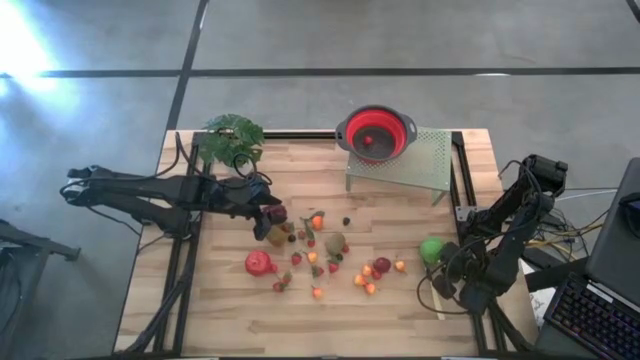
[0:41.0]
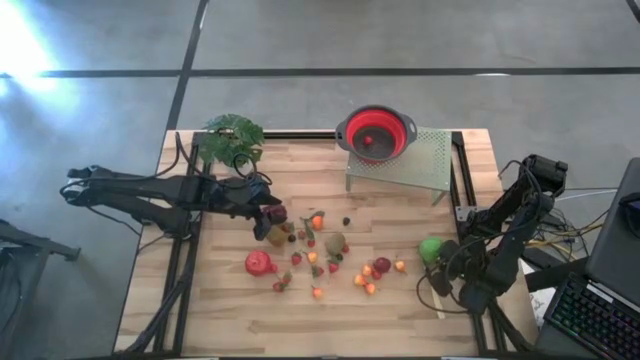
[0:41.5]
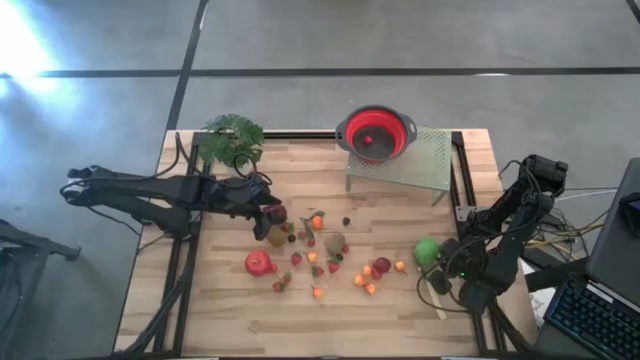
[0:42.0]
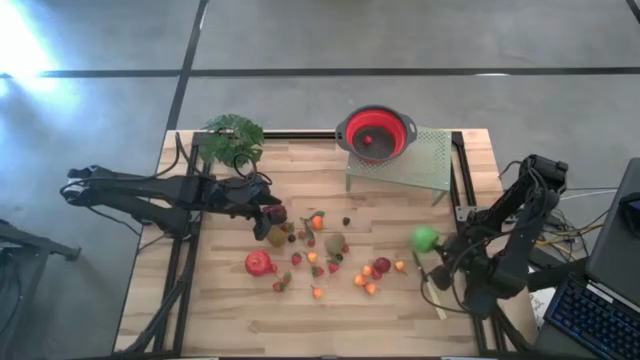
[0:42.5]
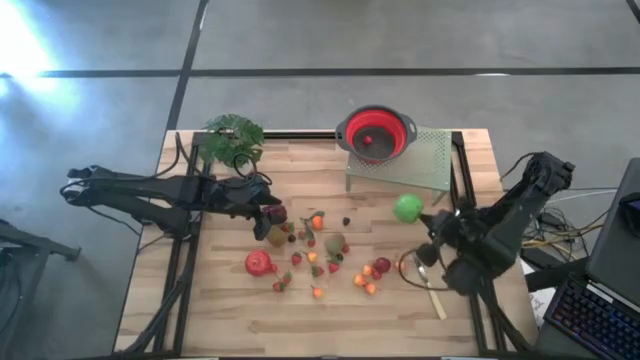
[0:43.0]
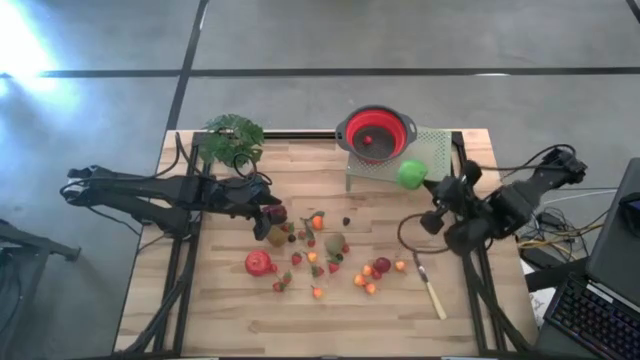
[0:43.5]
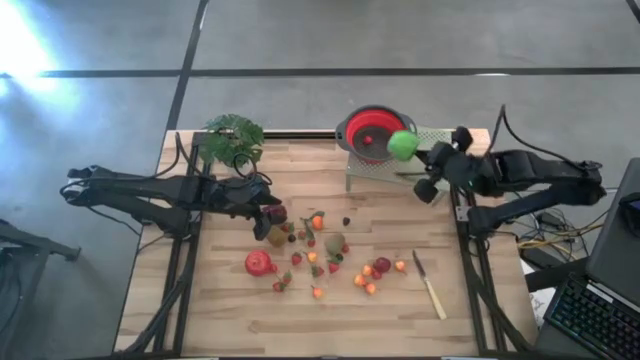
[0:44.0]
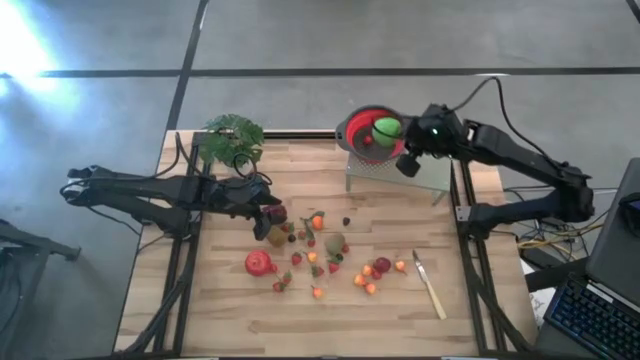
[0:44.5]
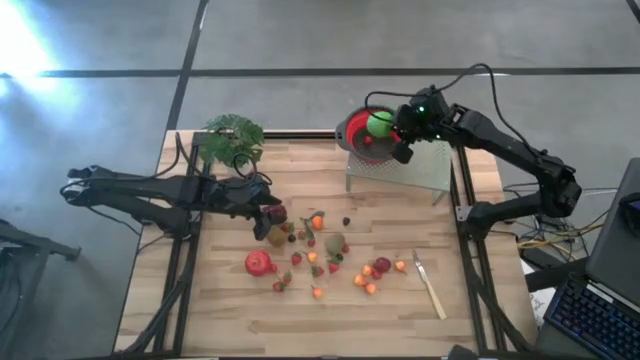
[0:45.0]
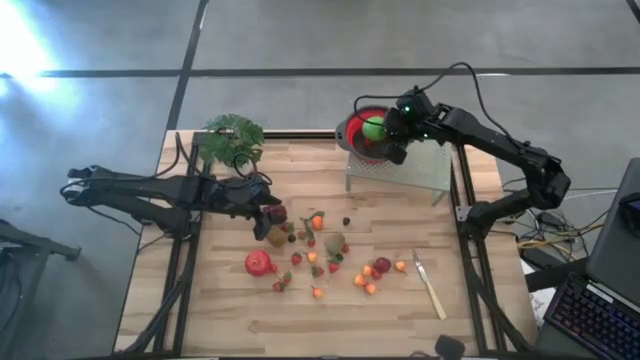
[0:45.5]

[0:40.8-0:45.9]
Task: Pick & Place Fruit
Put the green apple into the strainer bowl on the shelf

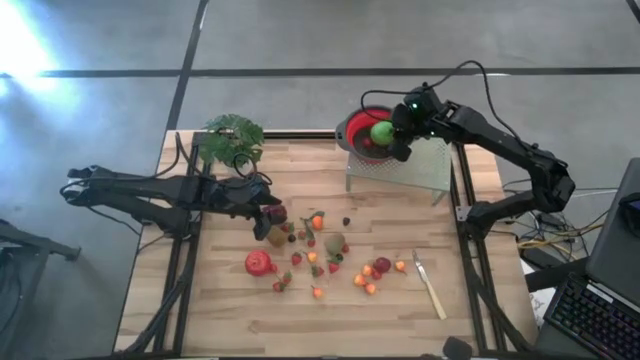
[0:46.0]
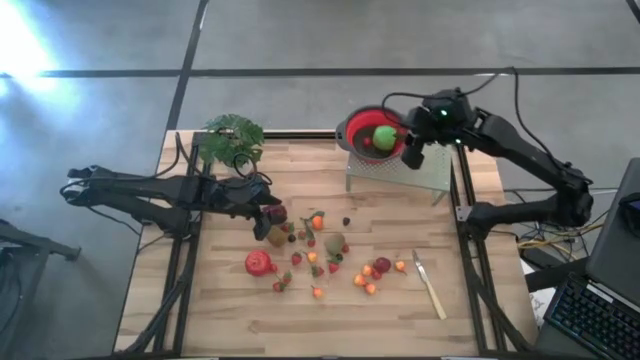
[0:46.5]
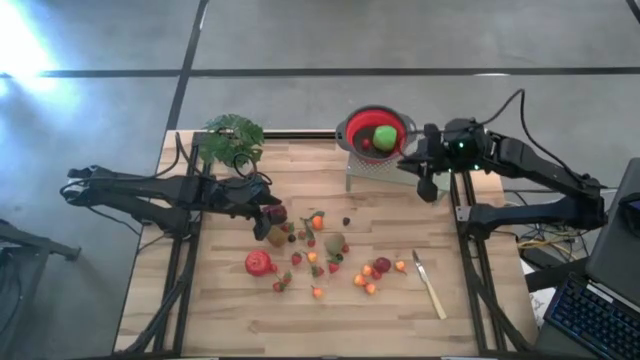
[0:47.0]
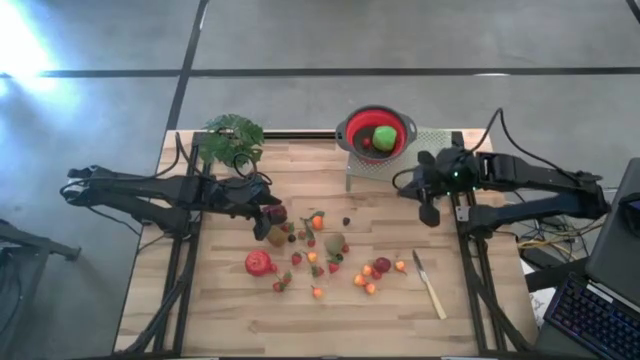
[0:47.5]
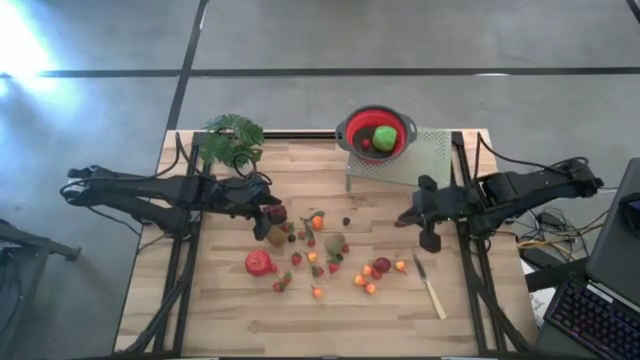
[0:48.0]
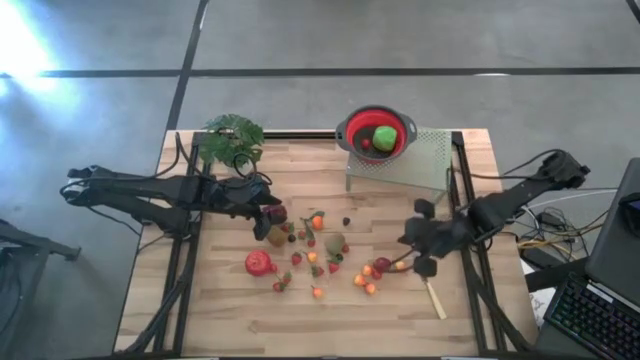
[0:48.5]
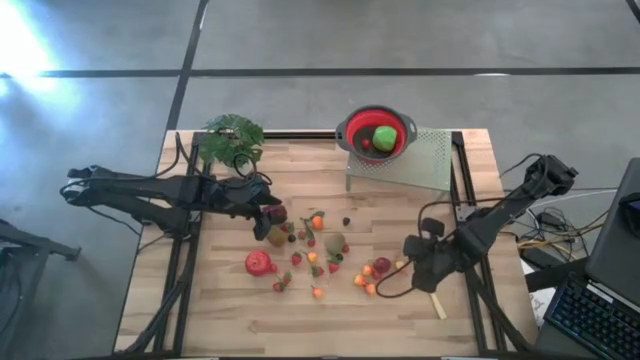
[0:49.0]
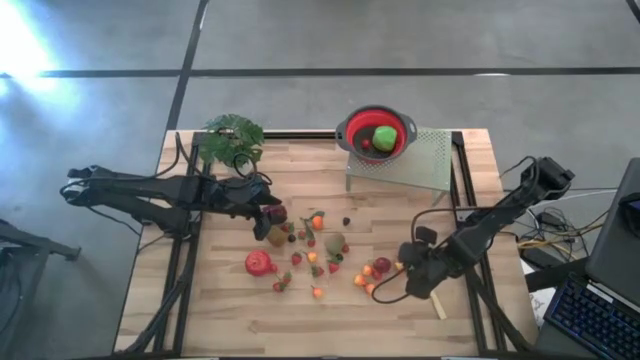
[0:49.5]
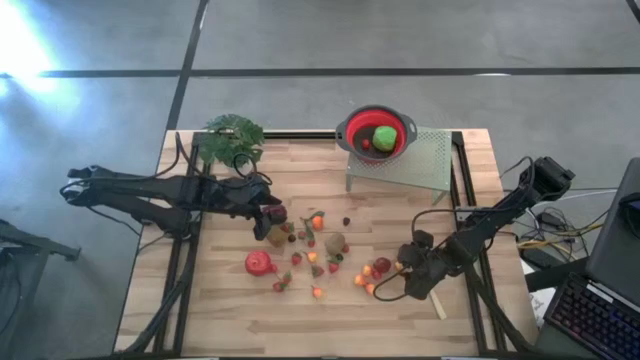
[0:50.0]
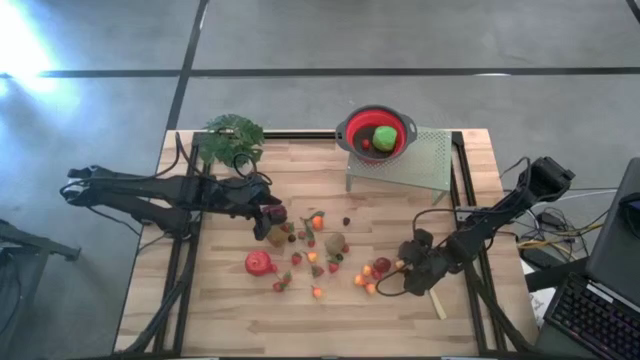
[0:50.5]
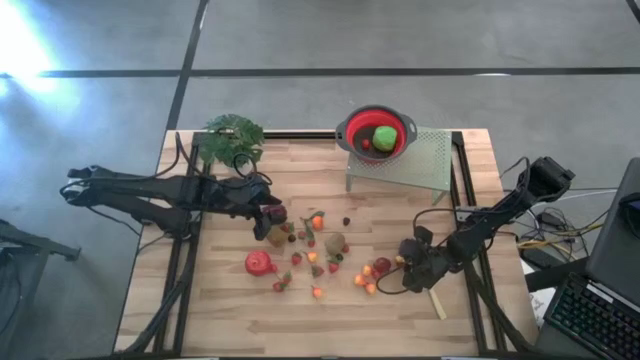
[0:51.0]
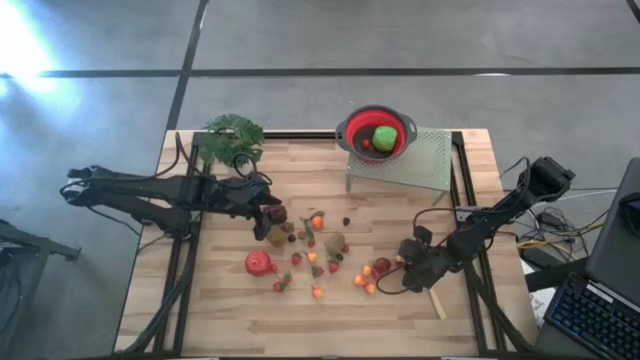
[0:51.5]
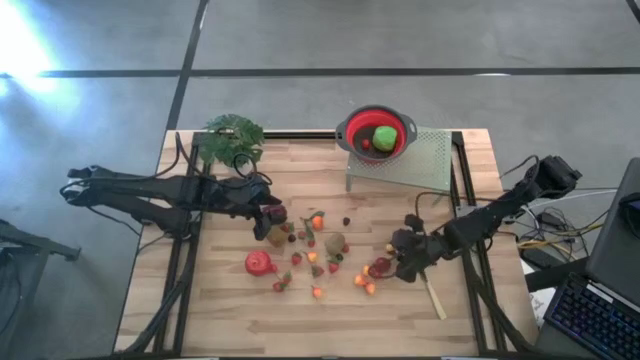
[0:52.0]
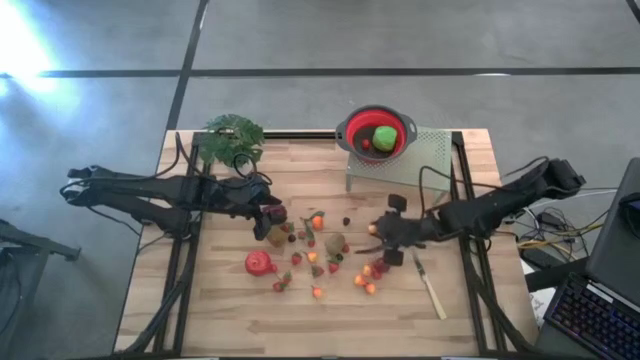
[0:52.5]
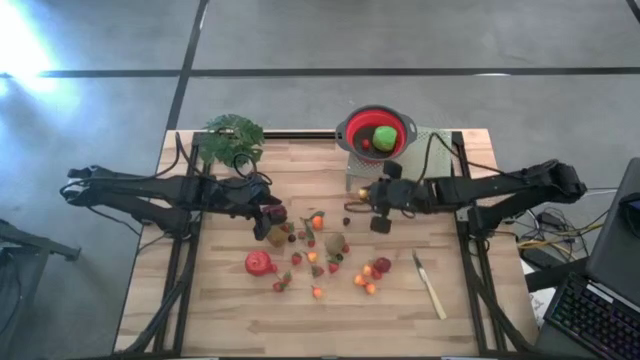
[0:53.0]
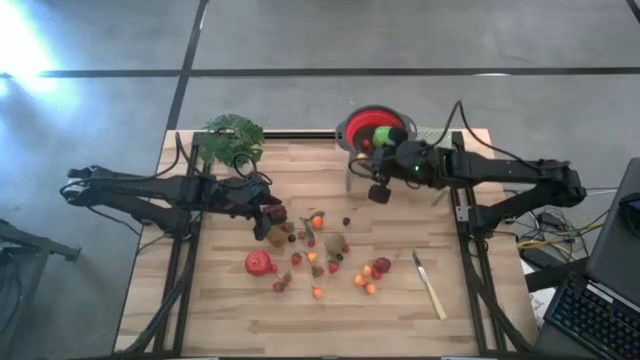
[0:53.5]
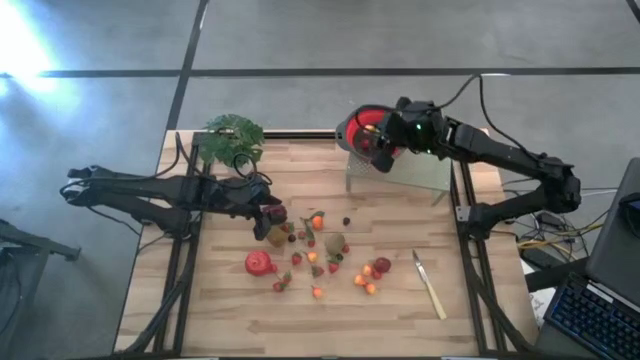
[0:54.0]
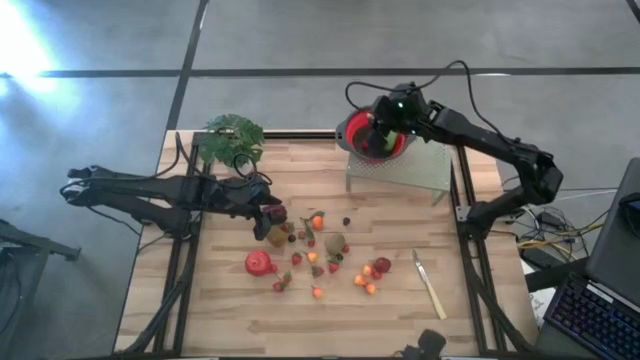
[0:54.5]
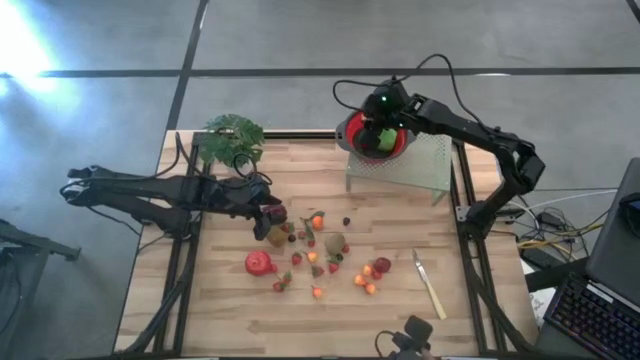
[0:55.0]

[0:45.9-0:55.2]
Put the pear into the strainer bowl on the shelf
